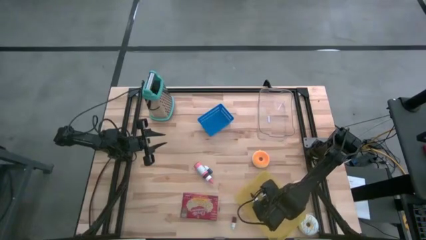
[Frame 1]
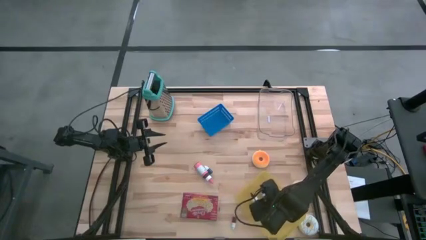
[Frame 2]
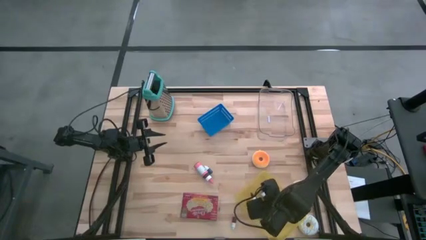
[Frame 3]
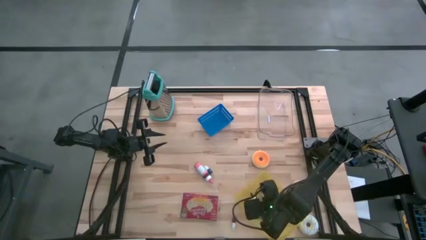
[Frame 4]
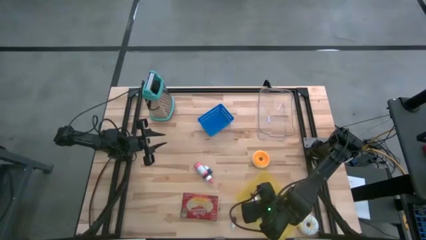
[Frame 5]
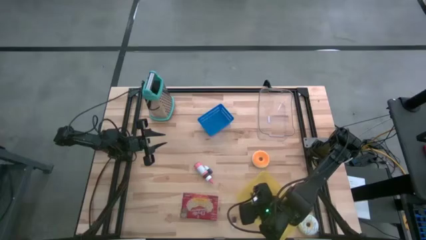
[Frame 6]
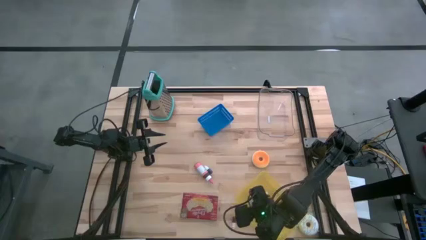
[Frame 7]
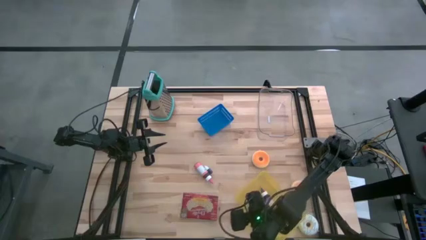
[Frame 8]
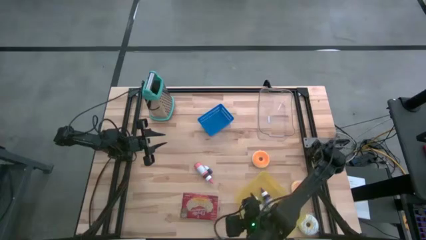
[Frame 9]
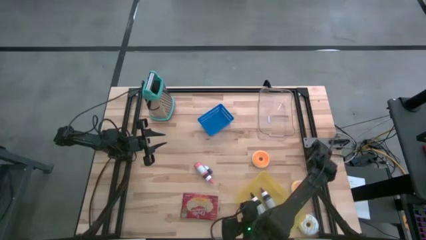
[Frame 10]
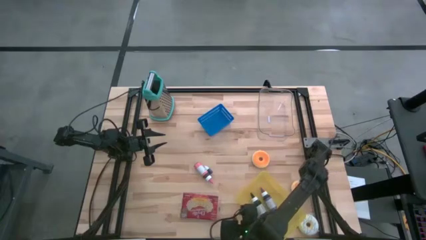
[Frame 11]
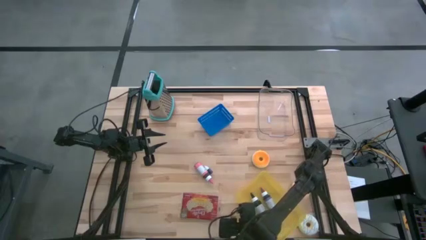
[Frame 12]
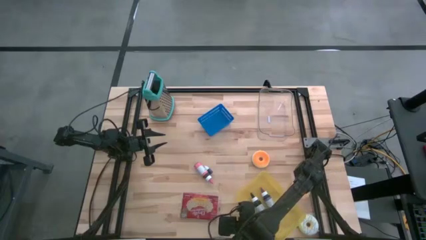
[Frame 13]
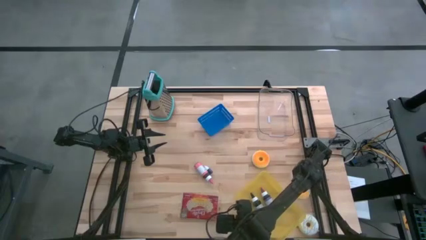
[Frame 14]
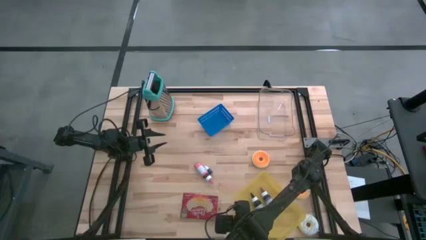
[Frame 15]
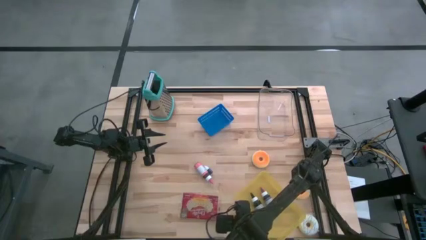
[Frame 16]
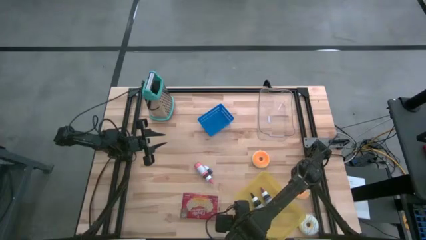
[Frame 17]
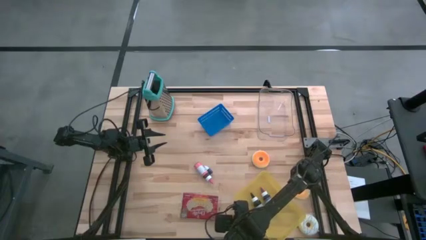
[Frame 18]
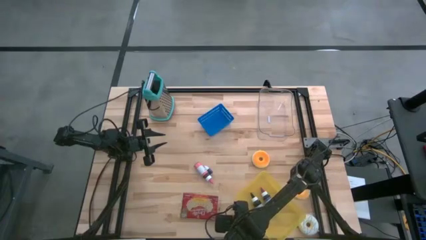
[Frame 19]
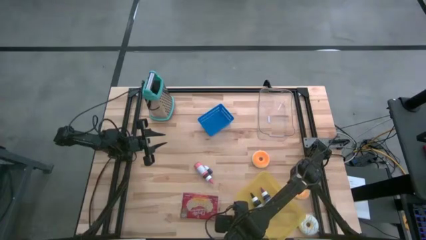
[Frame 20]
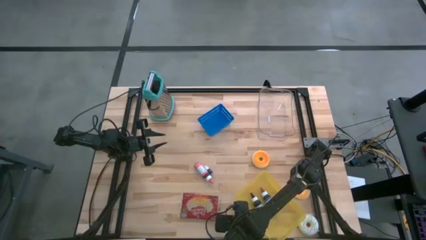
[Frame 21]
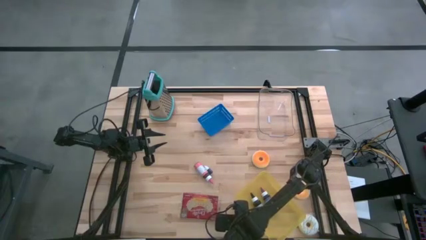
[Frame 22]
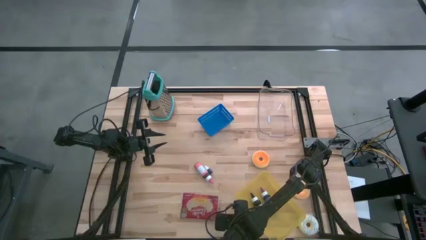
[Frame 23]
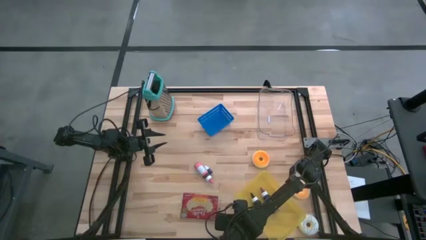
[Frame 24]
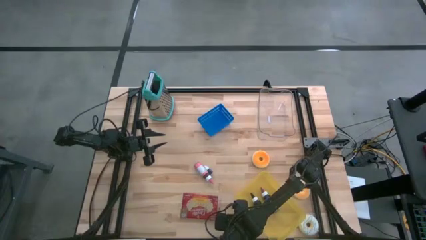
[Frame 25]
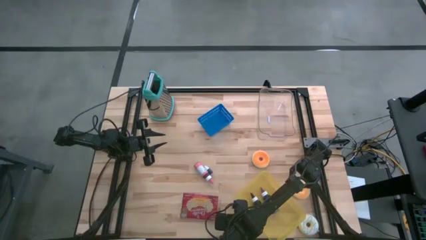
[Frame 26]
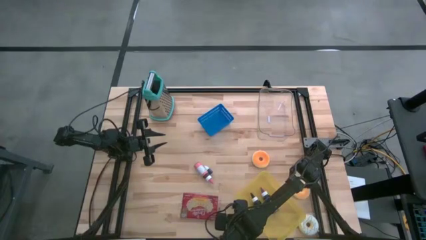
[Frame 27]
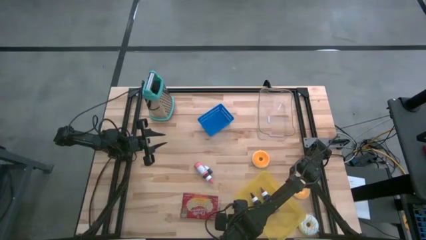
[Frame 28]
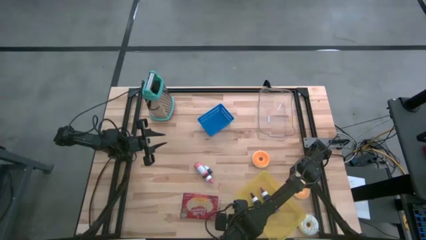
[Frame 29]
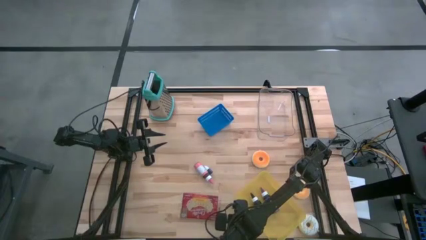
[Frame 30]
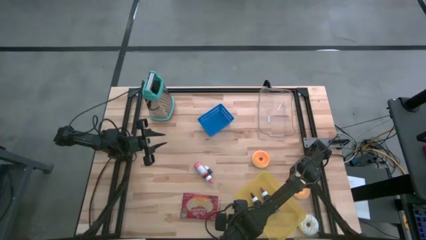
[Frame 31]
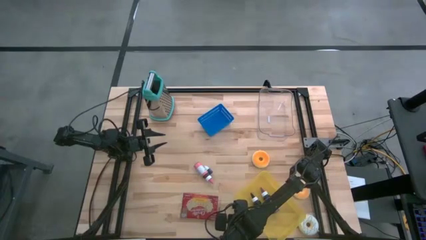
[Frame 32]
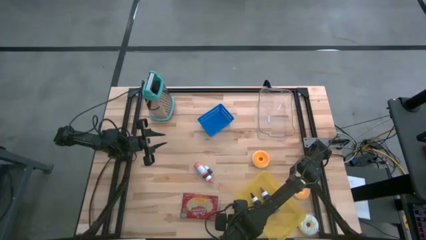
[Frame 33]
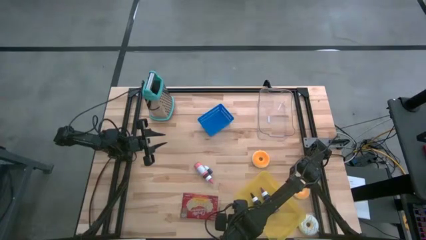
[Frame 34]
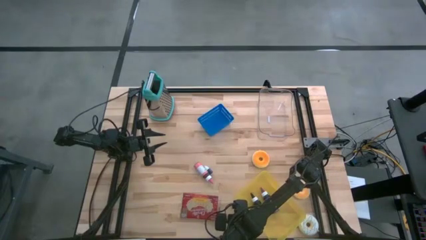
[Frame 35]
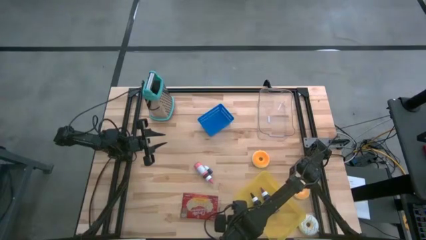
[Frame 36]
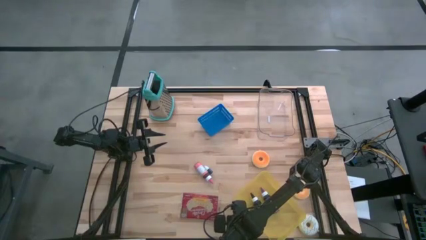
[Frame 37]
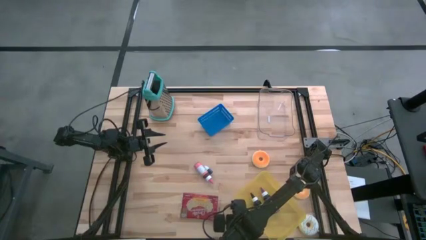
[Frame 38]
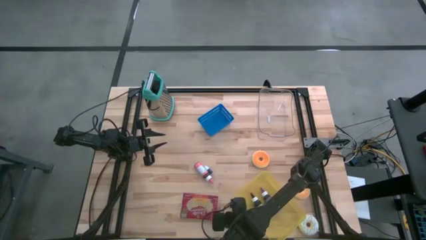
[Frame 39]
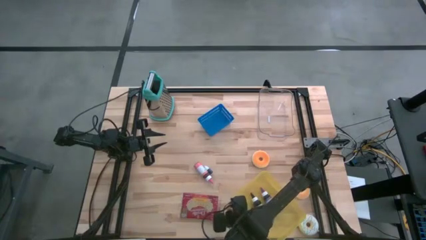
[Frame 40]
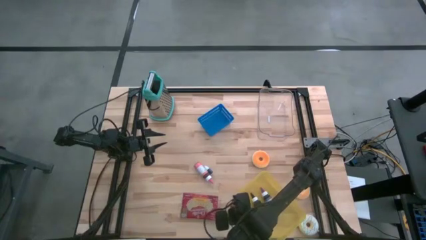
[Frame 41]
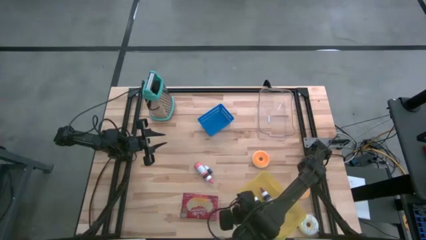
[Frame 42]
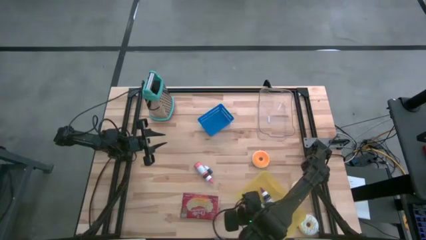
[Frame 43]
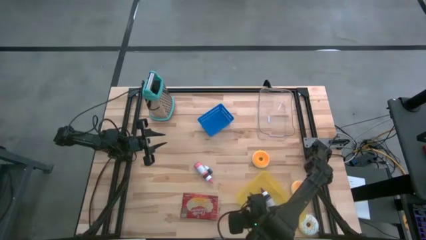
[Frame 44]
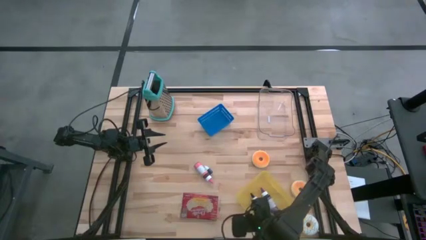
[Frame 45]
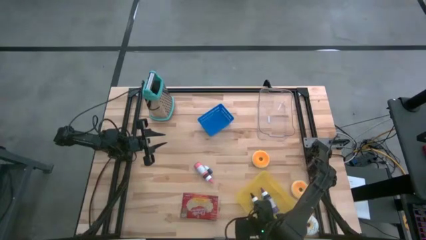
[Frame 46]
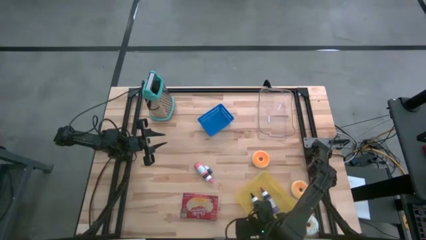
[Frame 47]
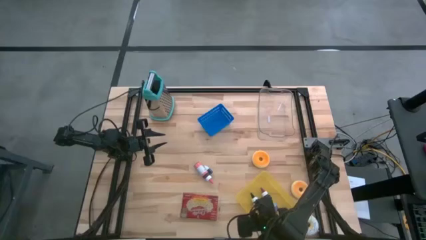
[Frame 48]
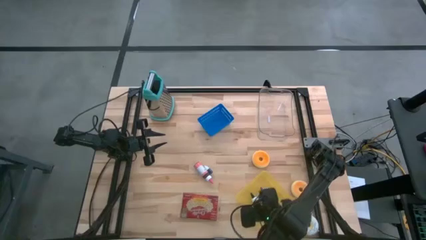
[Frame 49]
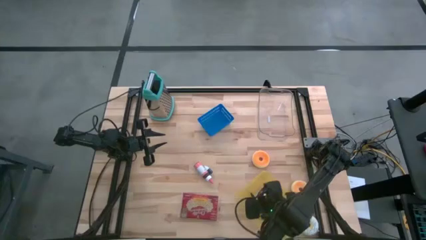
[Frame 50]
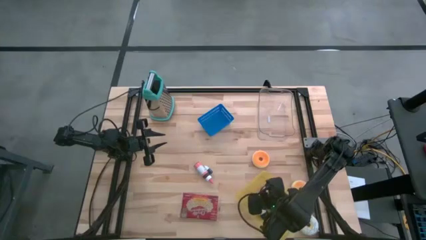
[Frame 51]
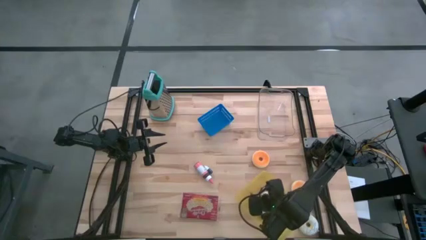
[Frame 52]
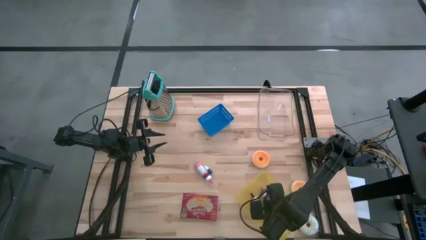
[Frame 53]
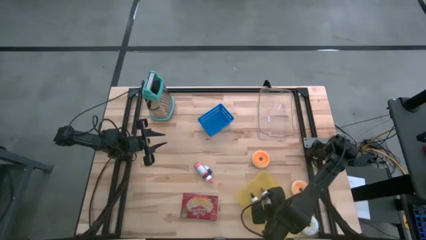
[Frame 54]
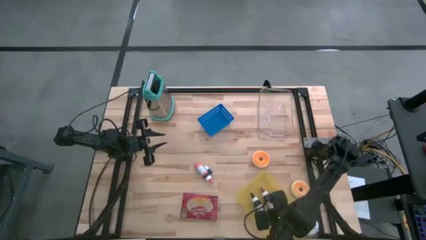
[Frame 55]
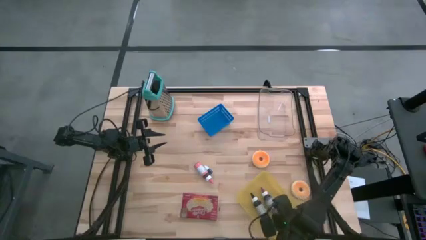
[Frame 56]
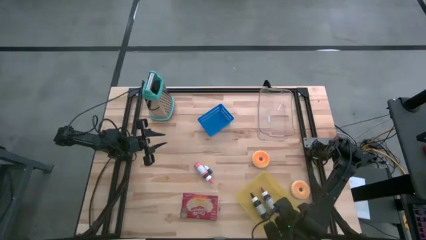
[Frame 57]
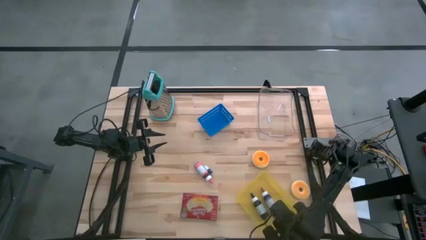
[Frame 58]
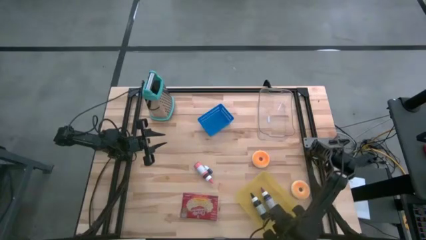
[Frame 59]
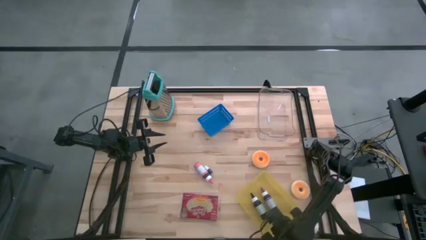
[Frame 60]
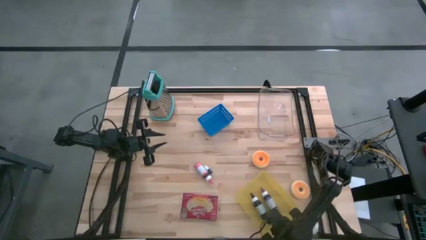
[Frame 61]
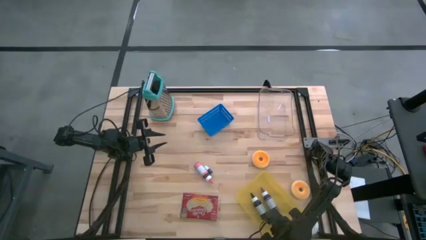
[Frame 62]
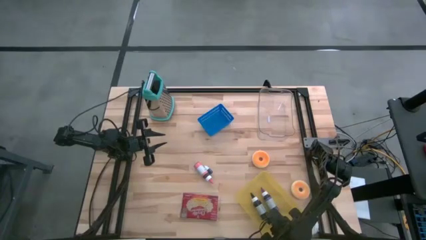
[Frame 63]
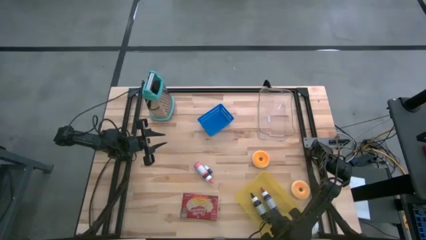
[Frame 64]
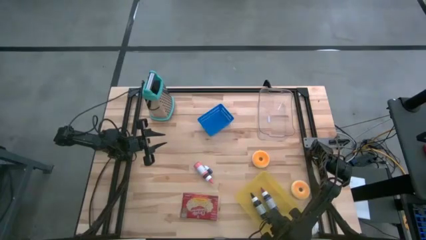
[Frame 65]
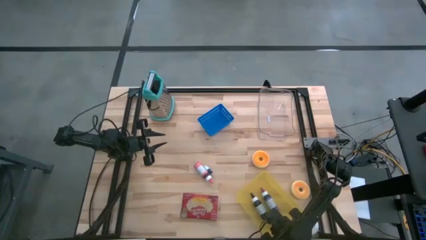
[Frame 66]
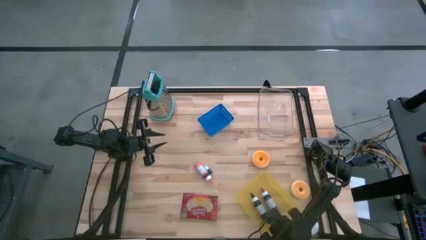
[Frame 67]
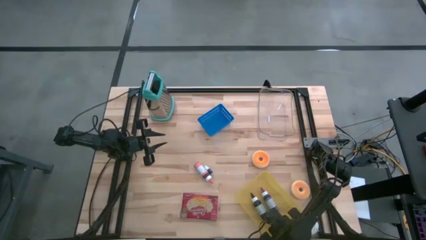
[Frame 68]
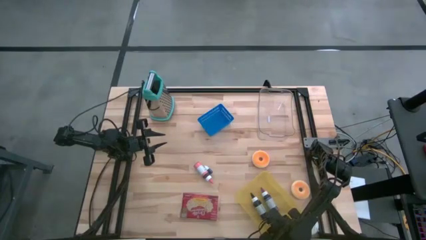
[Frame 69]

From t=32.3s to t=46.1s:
Task: Pick & Place Food Item
Put the small dark red food coloring into the yellow bin

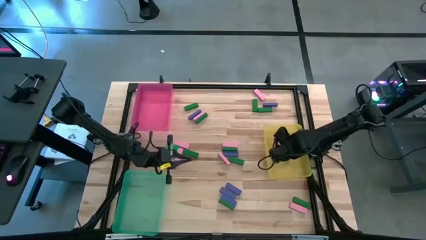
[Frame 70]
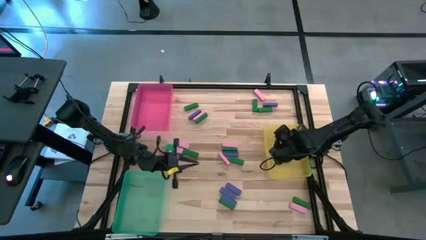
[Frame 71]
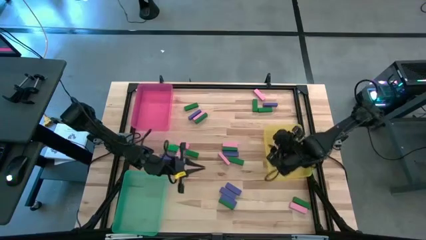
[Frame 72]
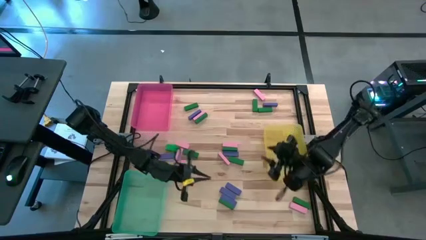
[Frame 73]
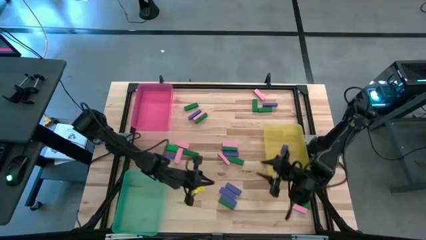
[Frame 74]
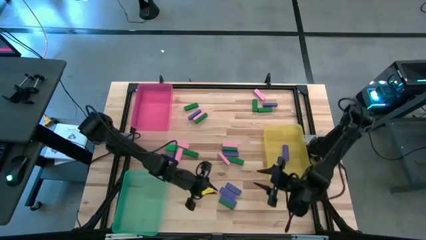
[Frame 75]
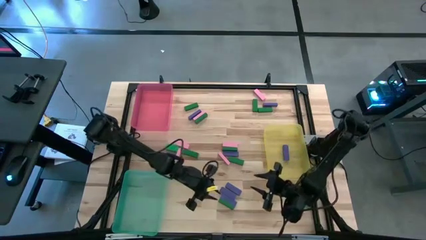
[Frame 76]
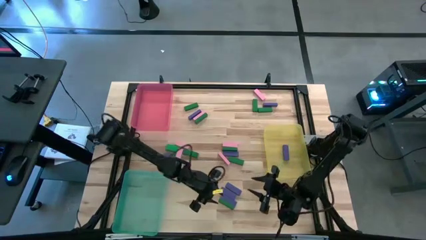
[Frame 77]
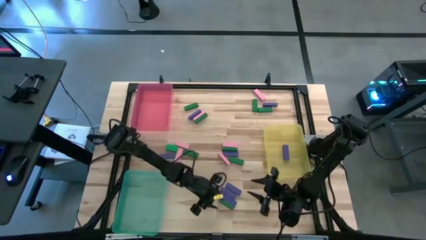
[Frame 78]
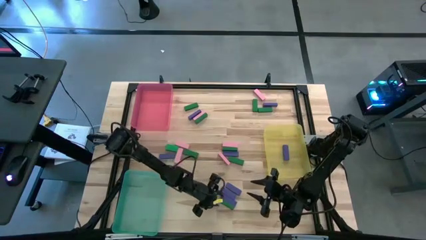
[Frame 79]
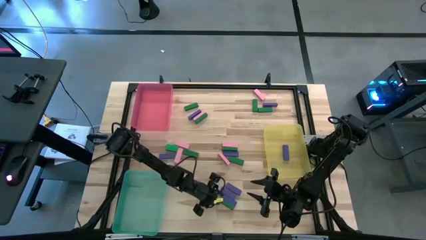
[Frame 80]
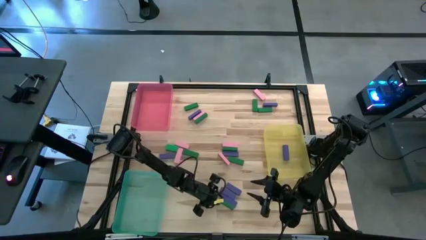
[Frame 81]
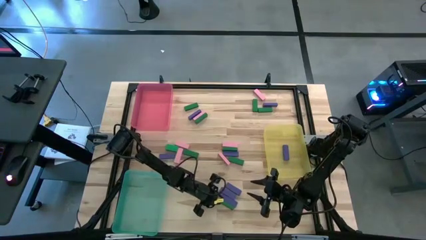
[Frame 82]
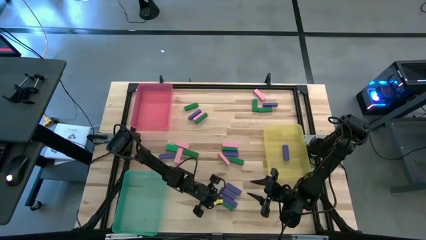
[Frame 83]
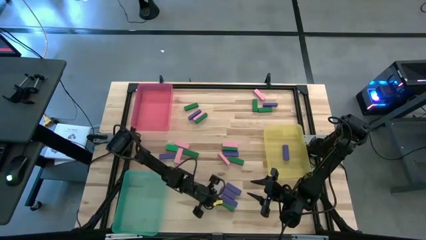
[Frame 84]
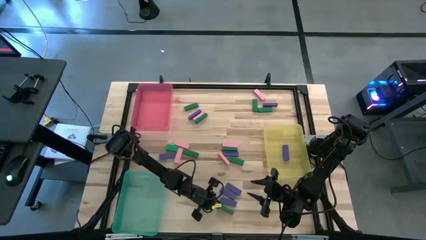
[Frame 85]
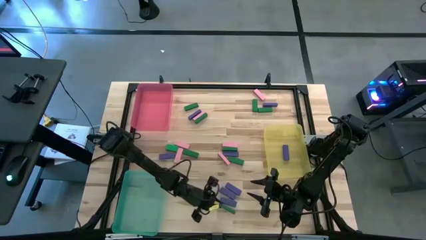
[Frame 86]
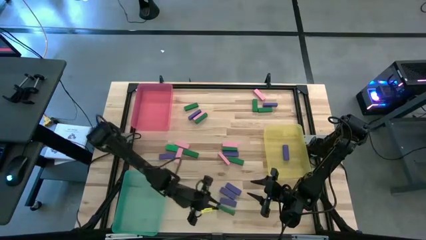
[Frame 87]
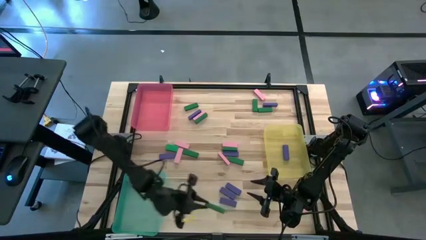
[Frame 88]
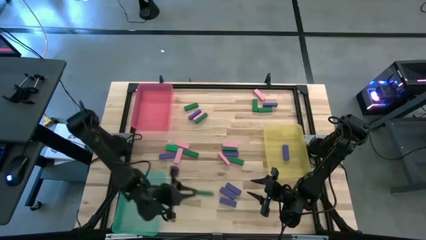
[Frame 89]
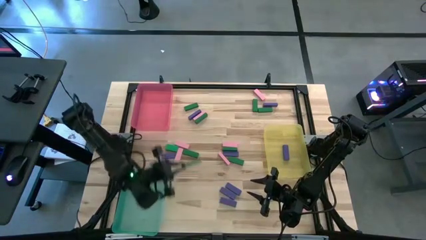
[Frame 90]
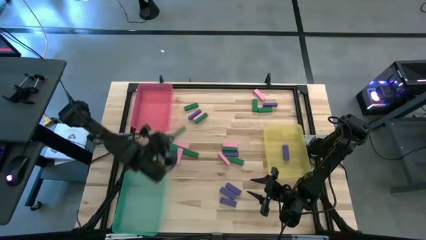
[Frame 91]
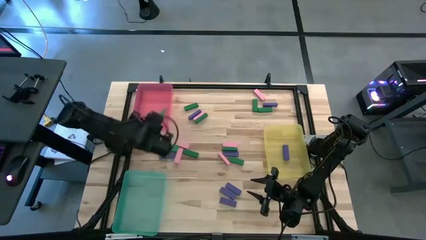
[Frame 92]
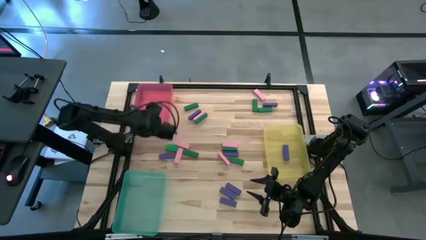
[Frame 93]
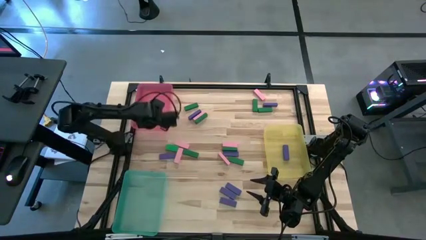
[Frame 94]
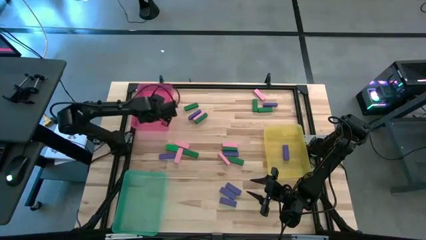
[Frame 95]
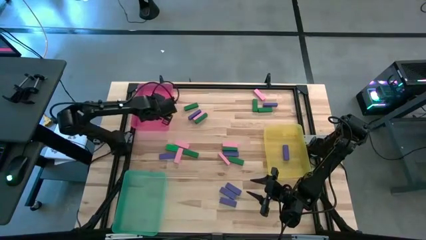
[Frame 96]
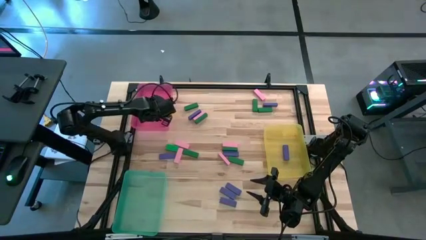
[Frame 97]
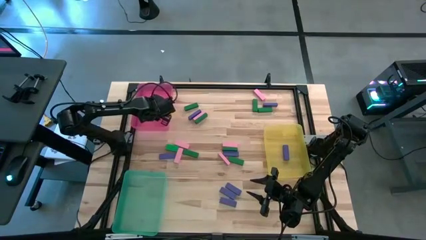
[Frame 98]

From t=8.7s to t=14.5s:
Task: Sort blocks
Put the green block into the pink bin
